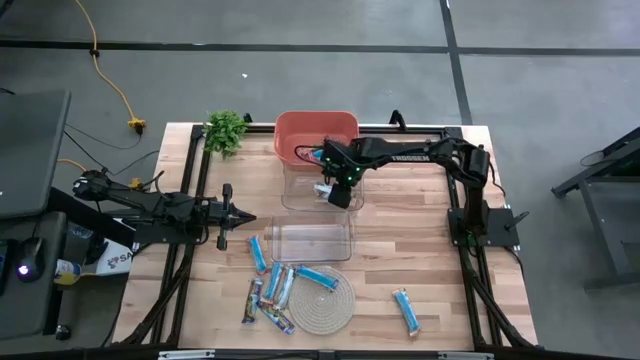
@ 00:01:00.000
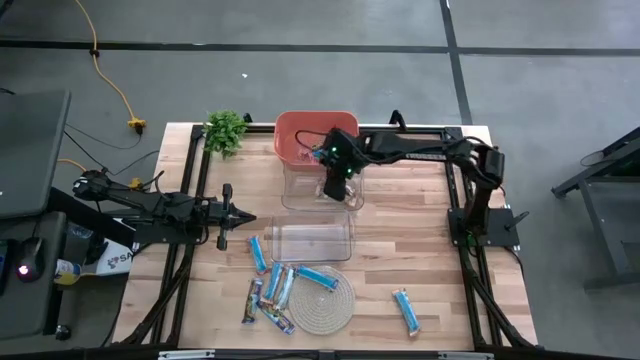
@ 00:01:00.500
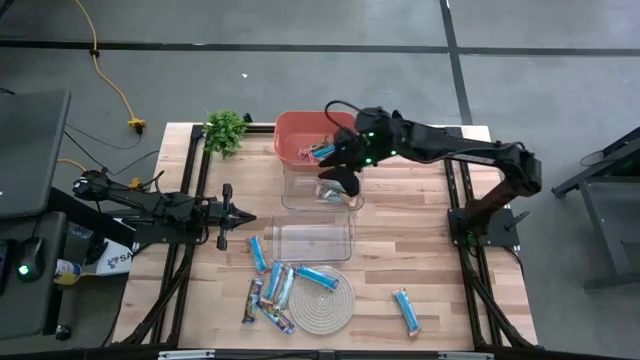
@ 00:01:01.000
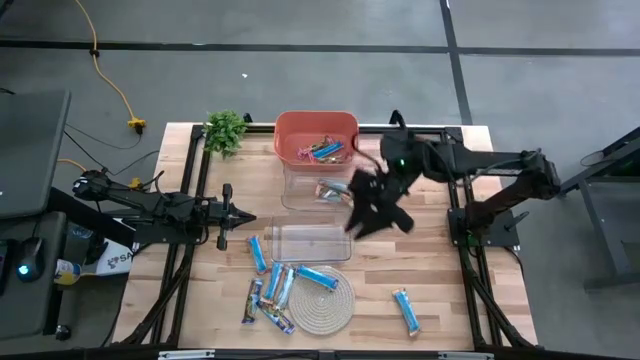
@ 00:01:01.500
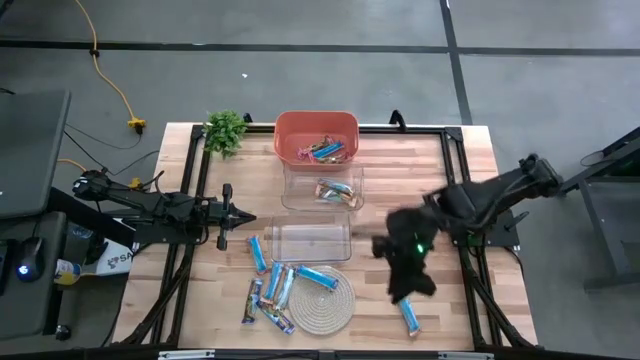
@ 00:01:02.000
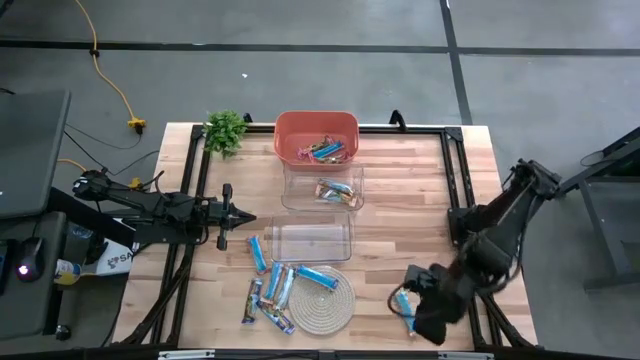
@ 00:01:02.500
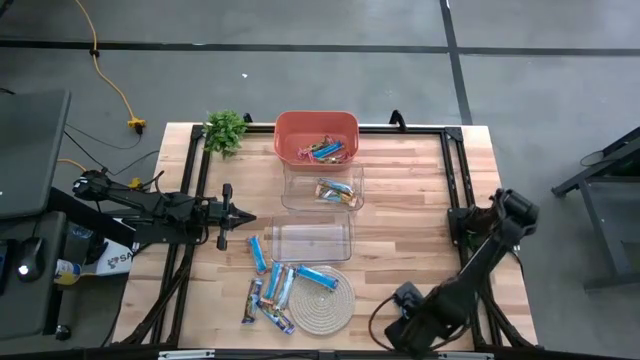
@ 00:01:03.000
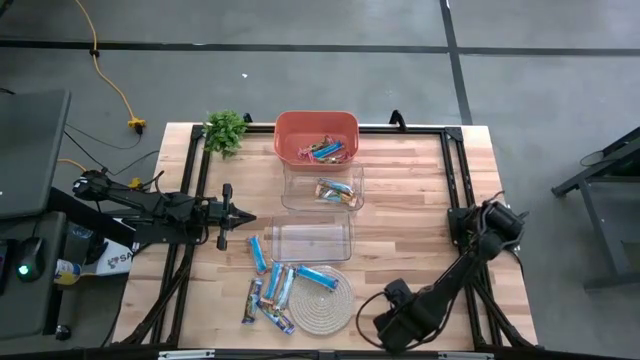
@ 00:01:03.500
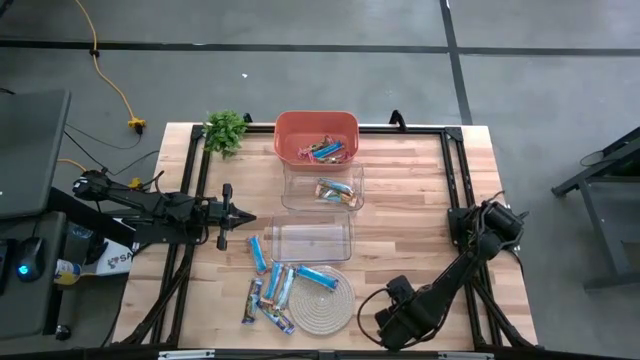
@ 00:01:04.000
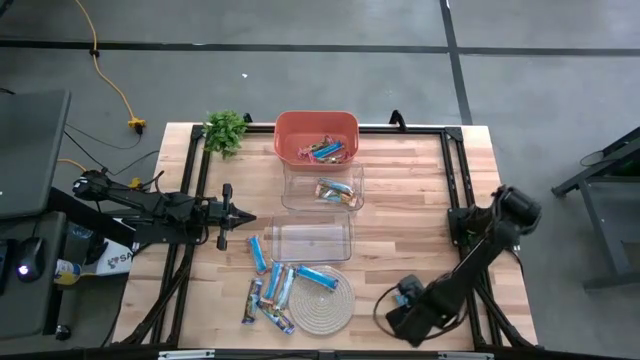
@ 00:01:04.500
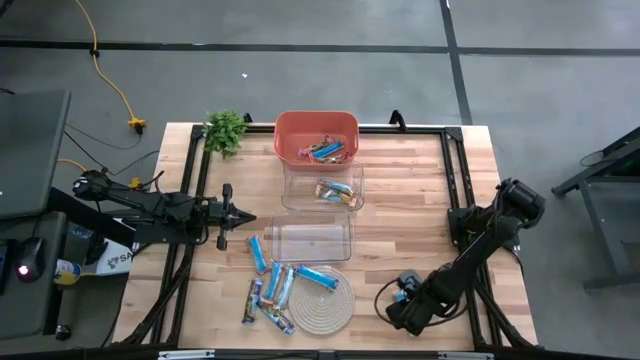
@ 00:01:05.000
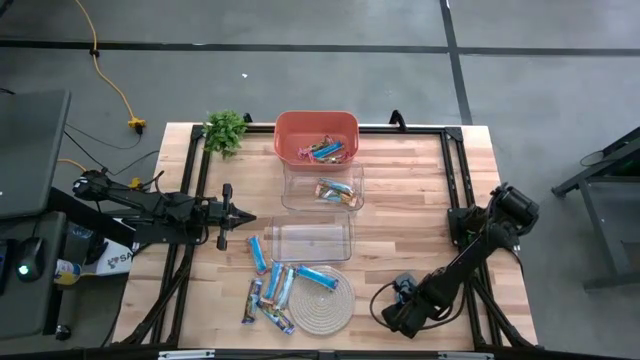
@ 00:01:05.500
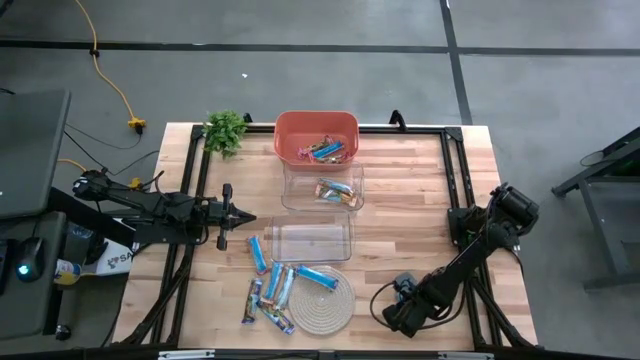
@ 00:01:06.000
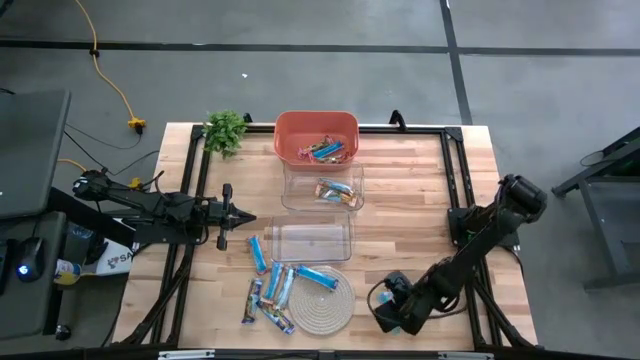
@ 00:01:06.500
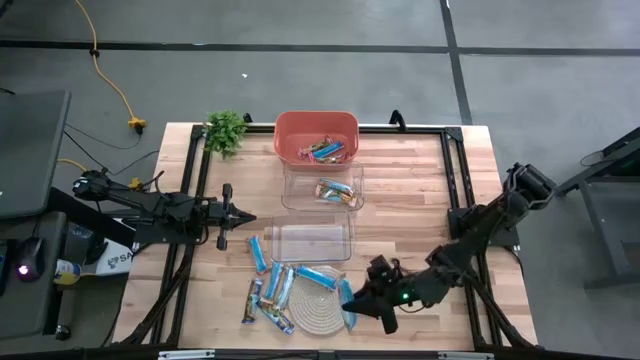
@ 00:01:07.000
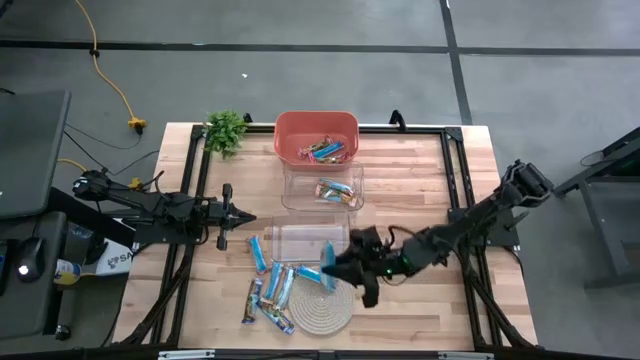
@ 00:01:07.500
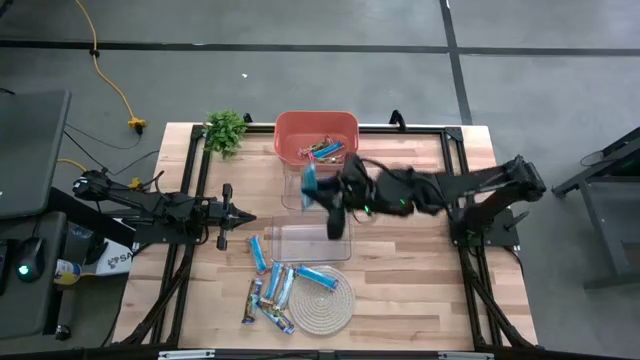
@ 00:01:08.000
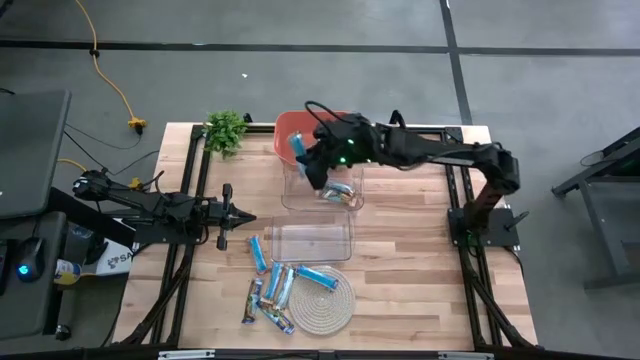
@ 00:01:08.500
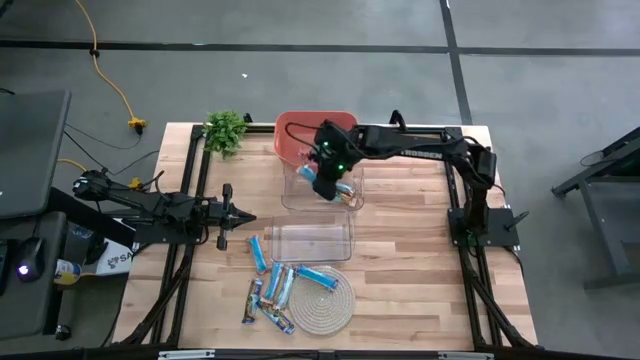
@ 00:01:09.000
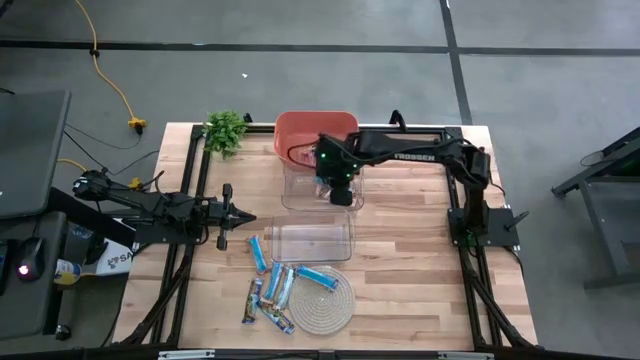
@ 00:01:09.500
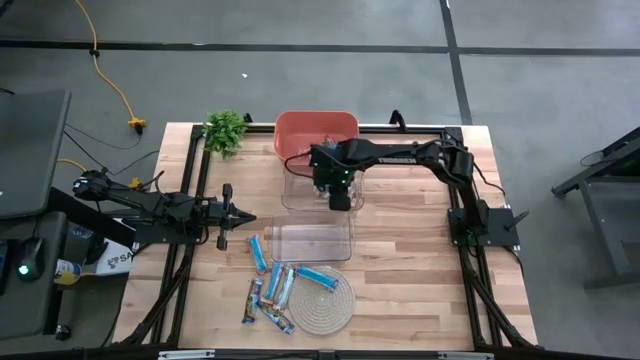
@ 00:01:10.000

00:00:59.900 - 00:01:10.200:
Task: Pick and place Granola Bars by type
Put the yellow granola bar into the top transparent bin

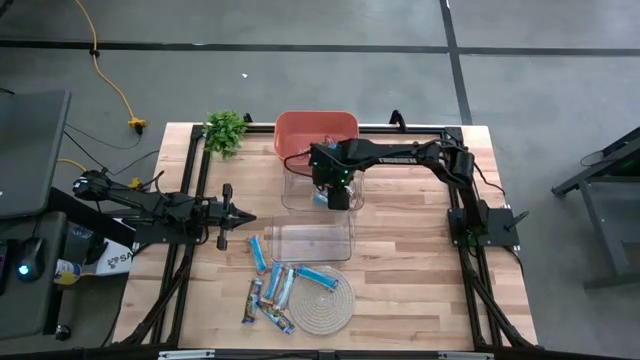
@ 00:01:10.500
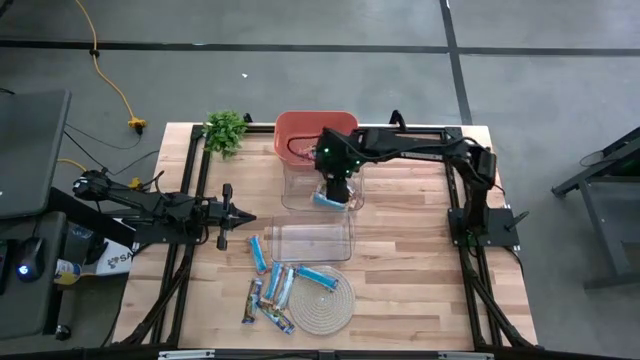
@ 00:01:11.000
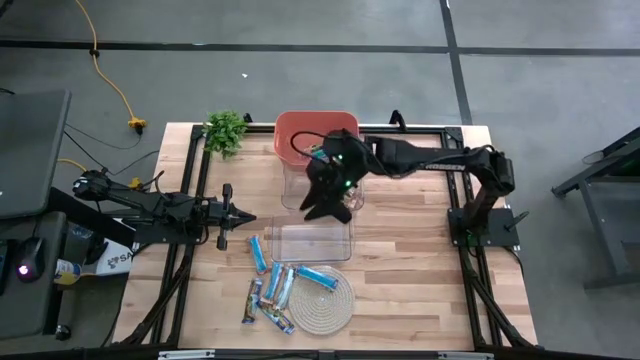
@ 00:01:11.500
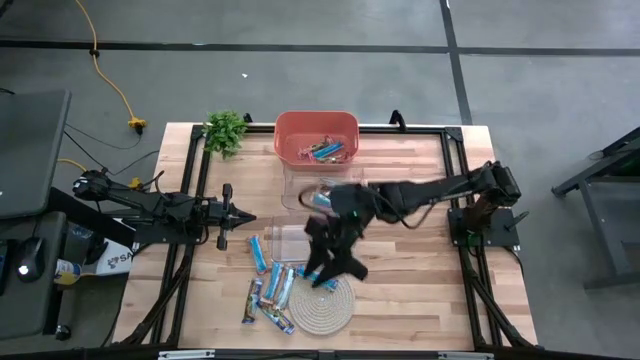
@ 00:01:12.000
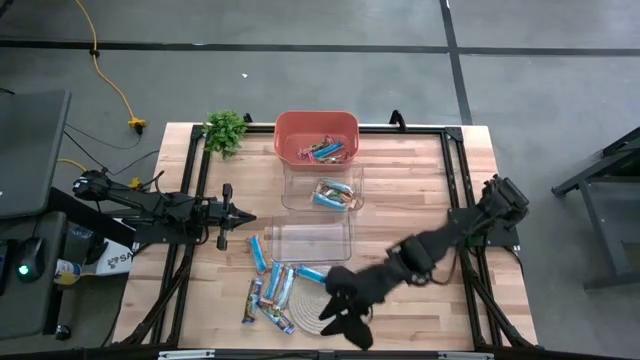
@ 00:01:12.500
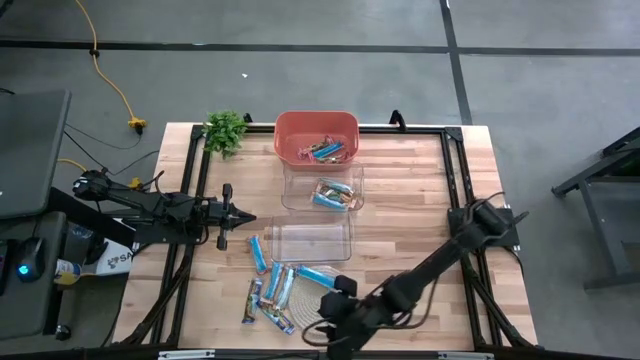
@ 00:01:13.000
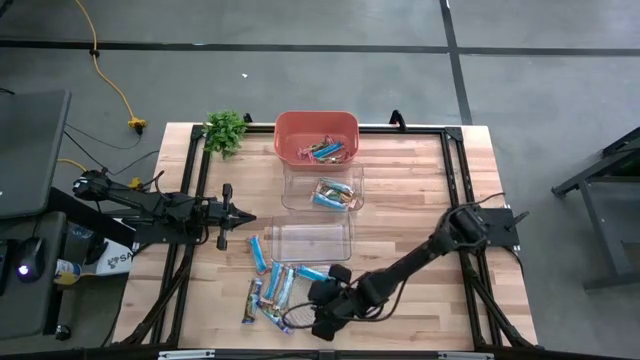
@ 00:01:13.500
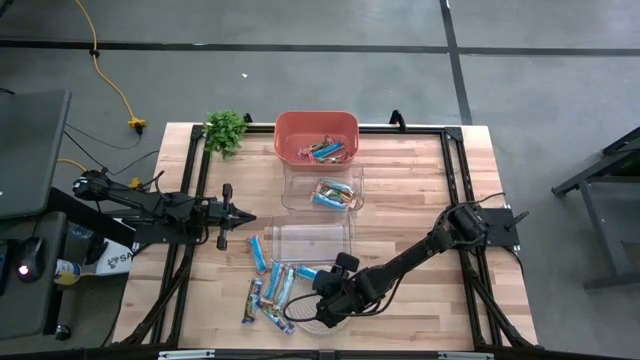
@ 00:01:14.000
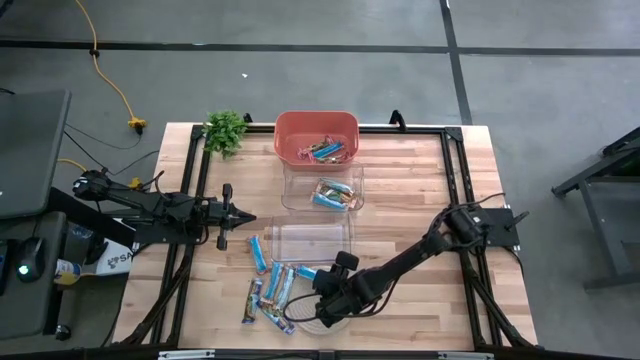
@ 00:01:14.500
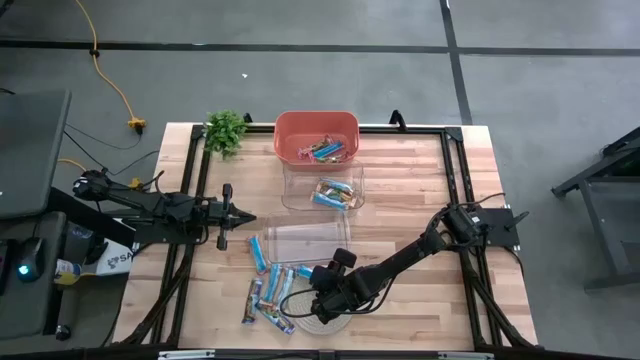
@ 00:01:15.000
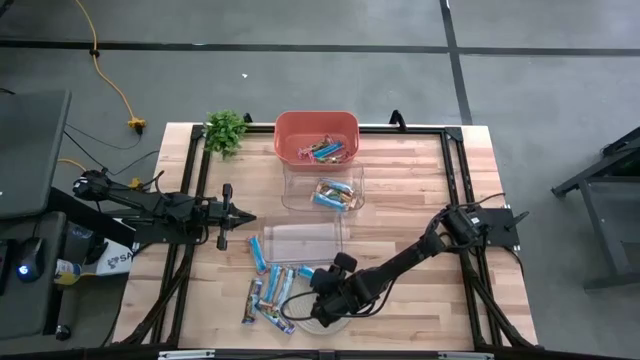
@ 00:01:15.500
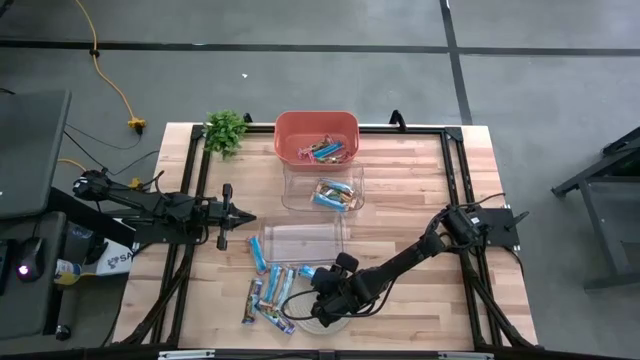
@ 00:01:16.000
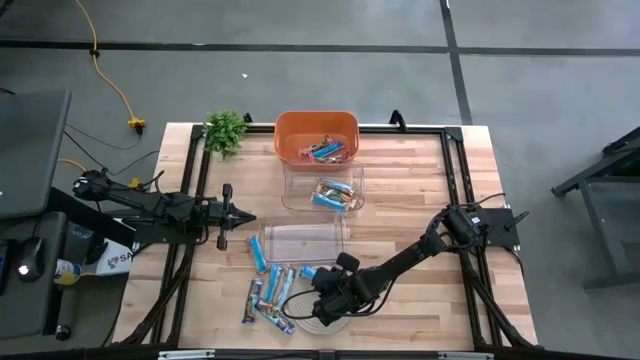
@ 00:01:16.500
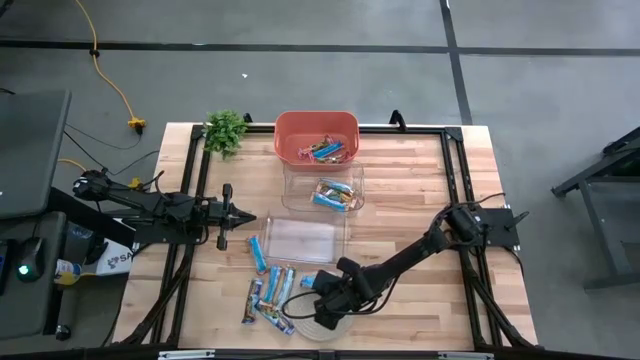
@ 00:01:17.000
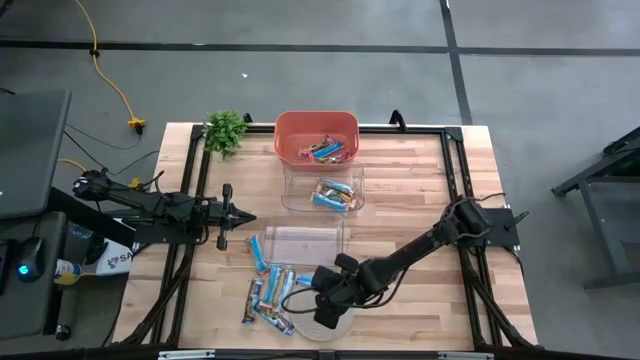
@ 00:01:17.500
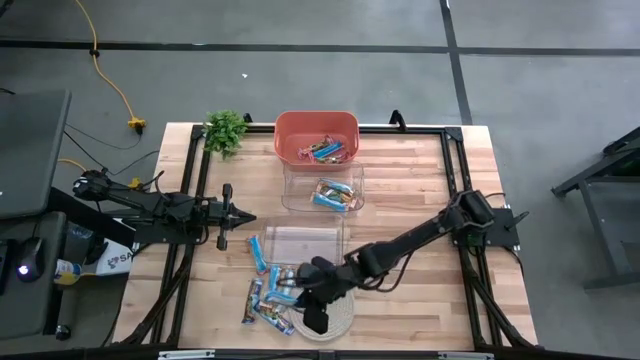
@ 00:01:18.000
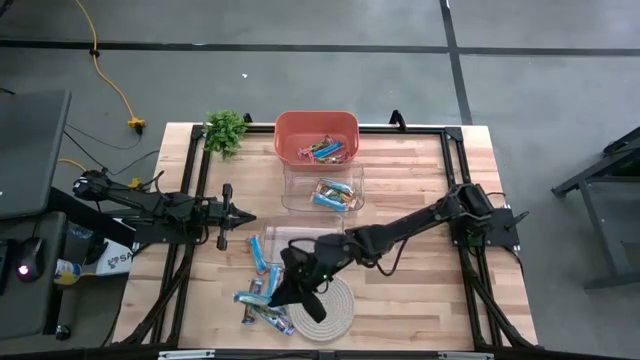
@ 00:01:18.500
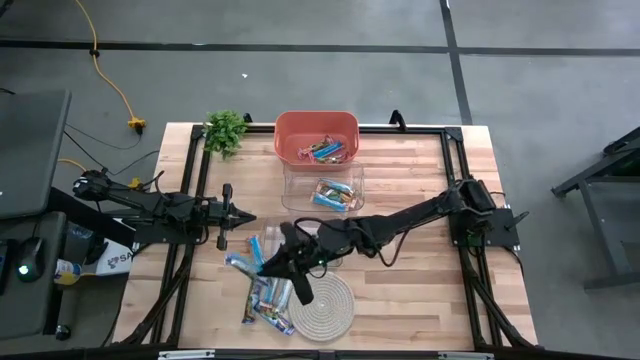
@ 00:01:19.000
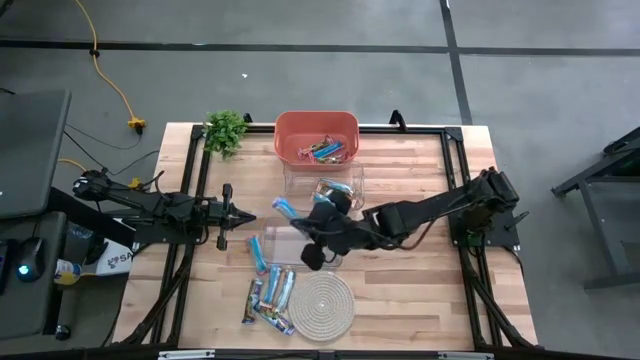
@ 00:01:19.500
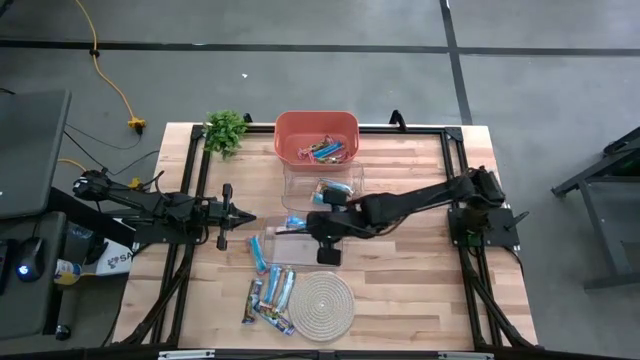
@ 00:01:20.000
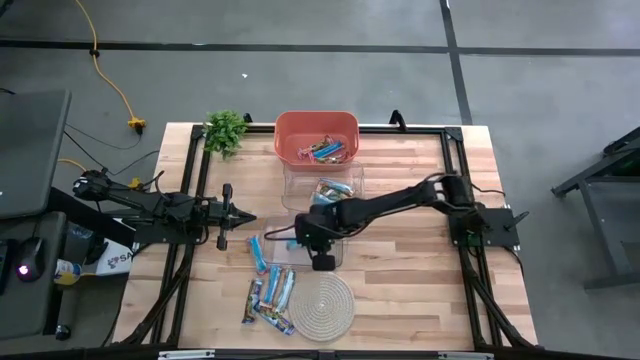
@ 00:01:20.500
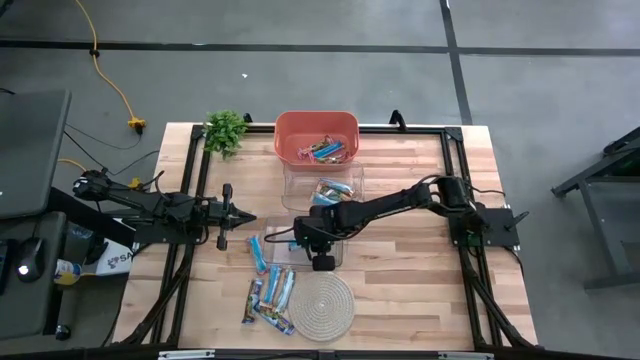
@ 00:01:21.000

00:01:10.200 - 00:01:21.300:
Put the blue granola bar into the bottom transparent bin
